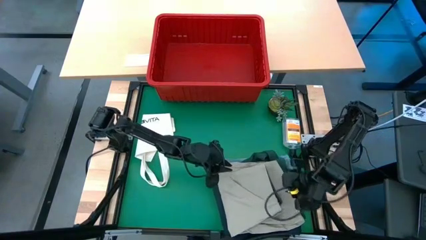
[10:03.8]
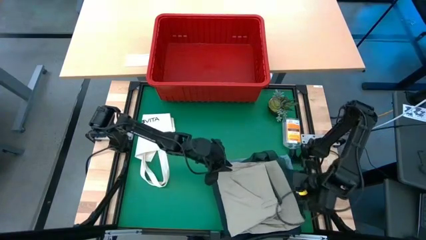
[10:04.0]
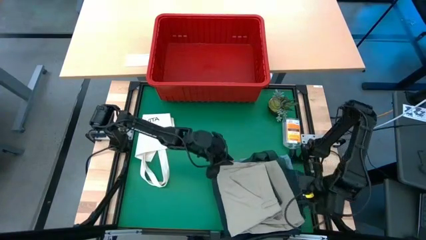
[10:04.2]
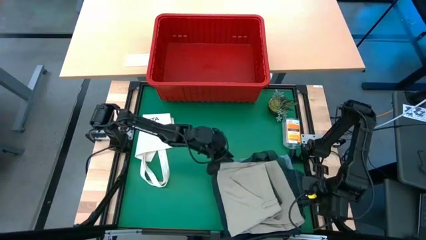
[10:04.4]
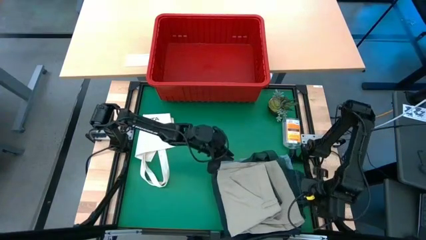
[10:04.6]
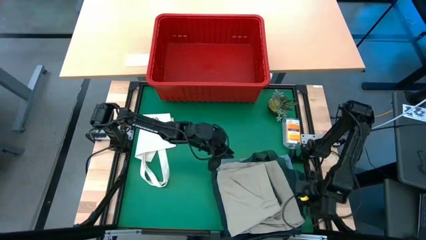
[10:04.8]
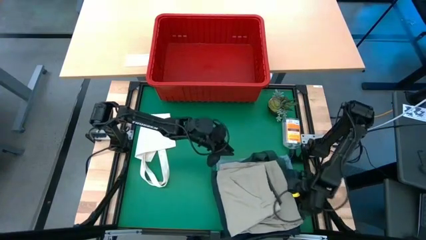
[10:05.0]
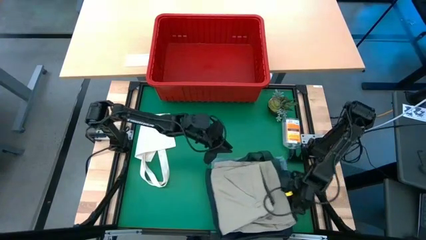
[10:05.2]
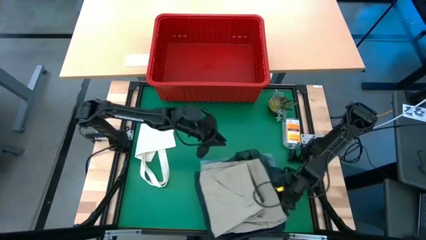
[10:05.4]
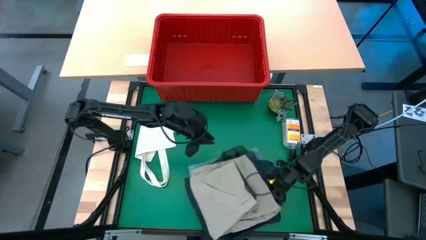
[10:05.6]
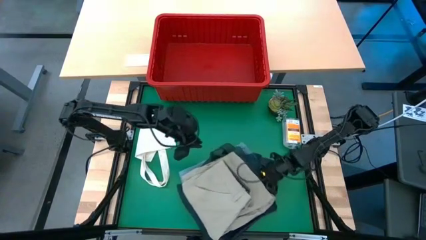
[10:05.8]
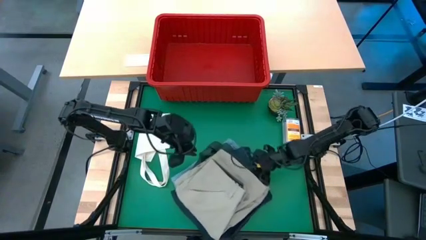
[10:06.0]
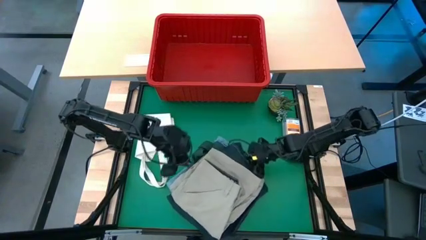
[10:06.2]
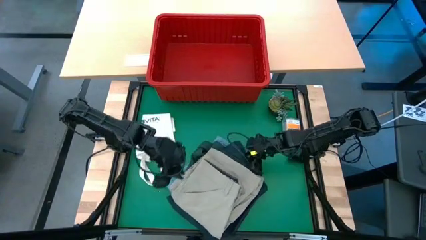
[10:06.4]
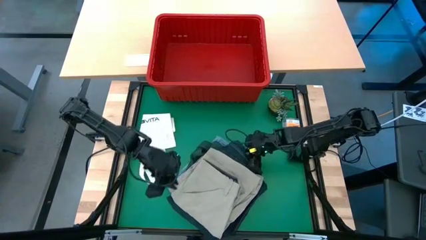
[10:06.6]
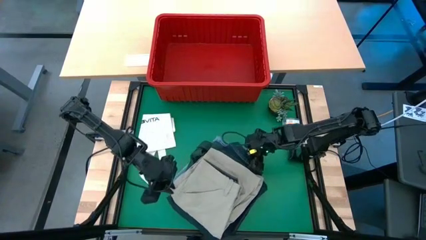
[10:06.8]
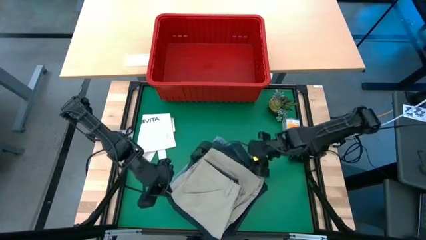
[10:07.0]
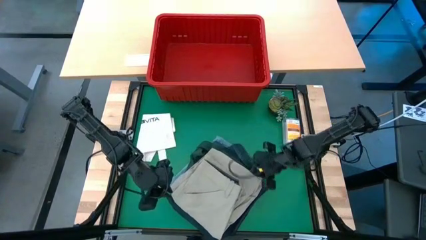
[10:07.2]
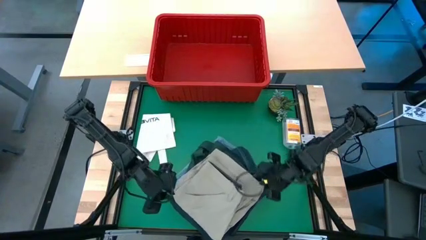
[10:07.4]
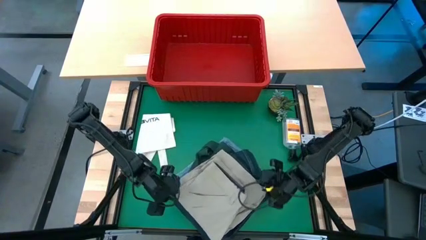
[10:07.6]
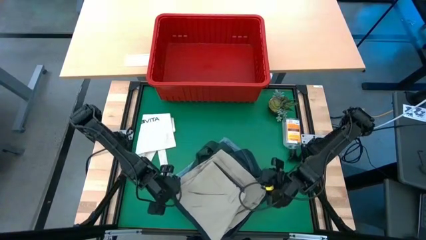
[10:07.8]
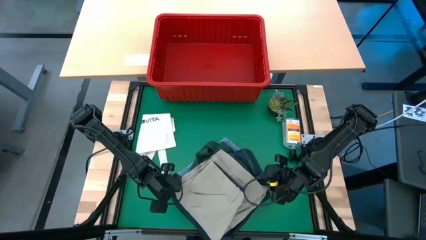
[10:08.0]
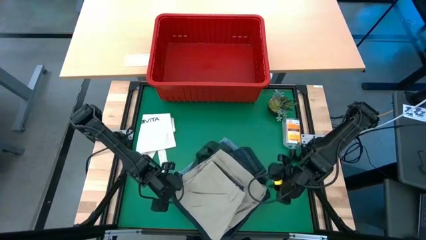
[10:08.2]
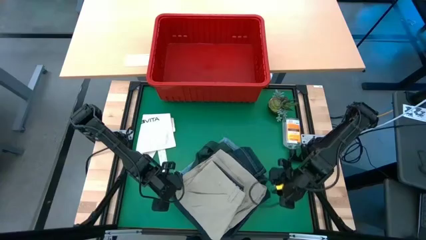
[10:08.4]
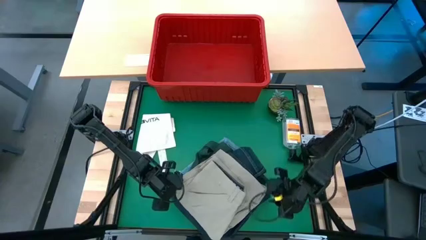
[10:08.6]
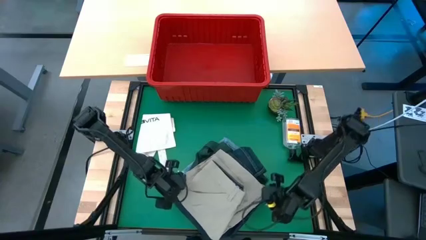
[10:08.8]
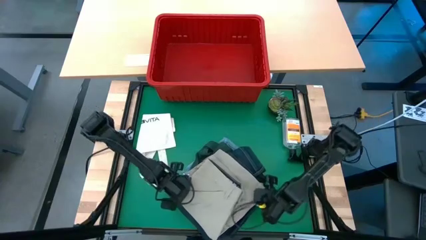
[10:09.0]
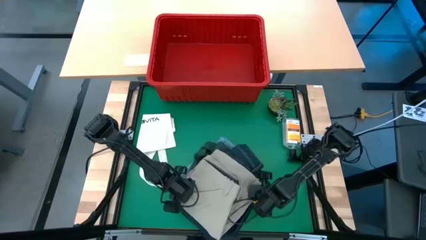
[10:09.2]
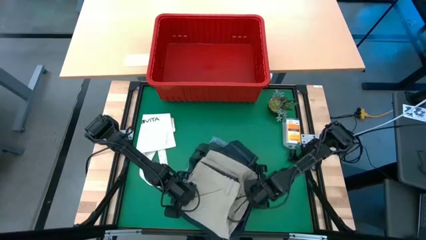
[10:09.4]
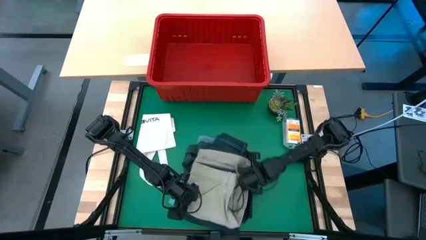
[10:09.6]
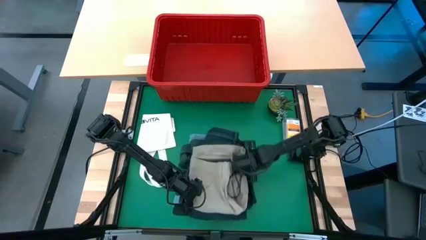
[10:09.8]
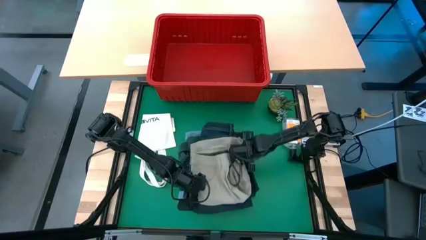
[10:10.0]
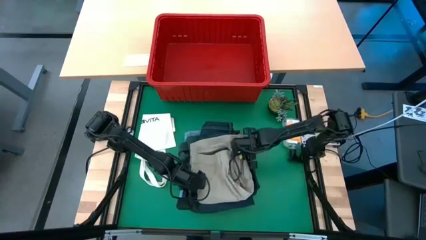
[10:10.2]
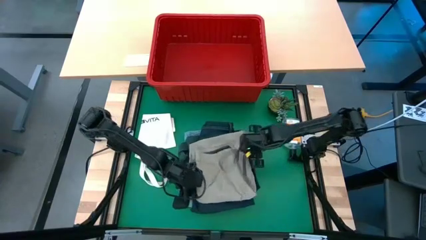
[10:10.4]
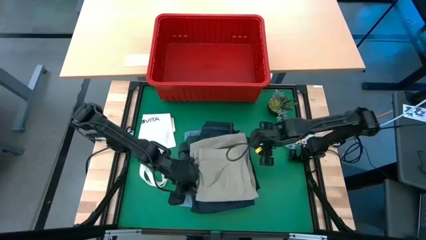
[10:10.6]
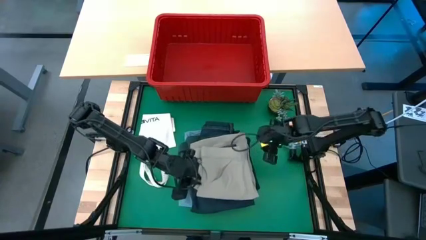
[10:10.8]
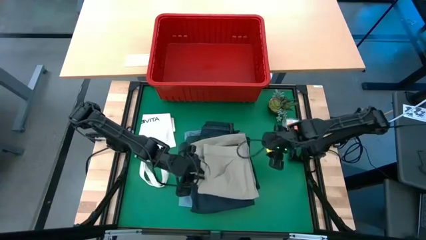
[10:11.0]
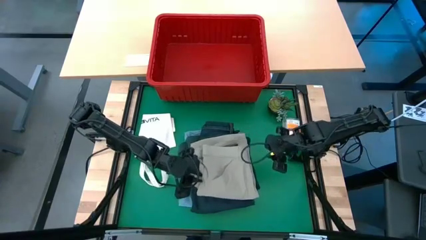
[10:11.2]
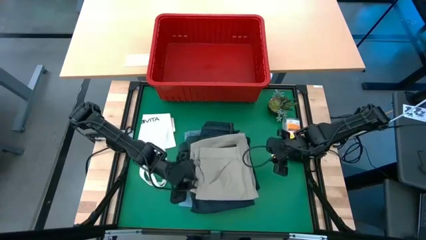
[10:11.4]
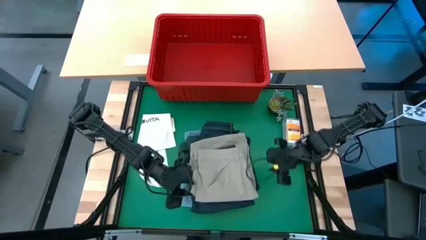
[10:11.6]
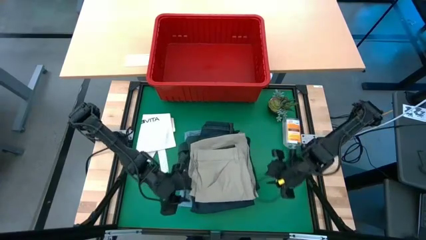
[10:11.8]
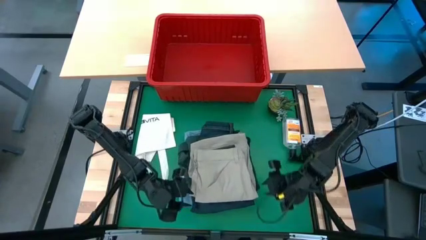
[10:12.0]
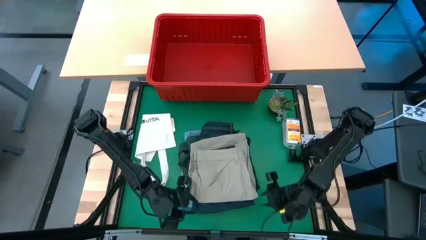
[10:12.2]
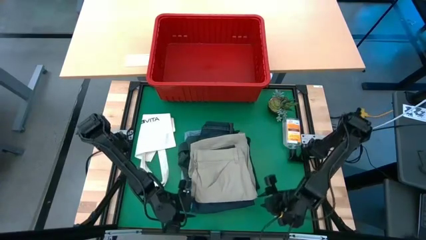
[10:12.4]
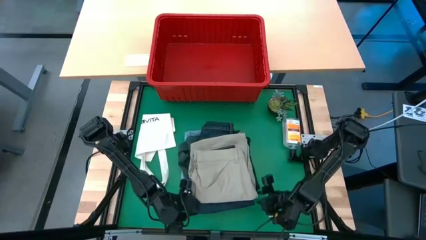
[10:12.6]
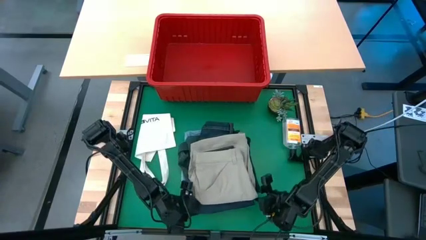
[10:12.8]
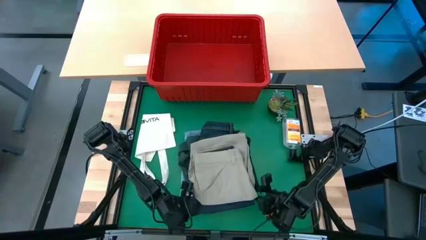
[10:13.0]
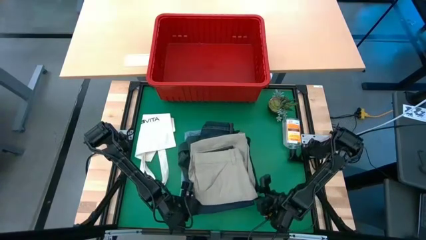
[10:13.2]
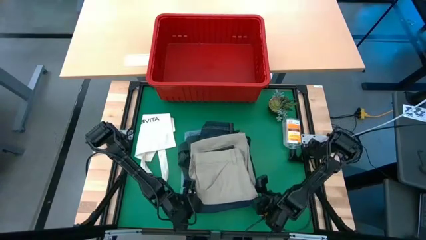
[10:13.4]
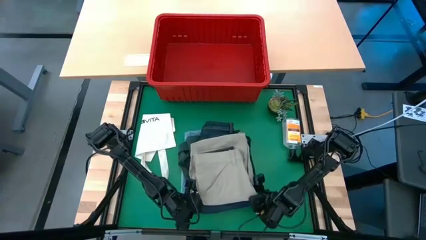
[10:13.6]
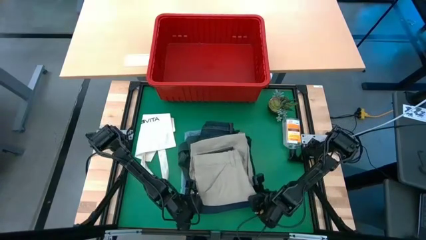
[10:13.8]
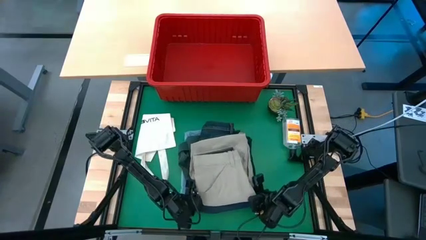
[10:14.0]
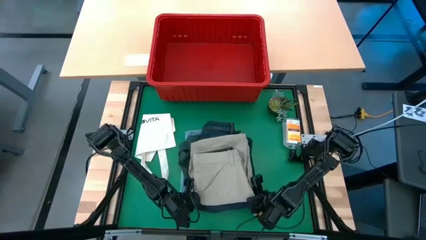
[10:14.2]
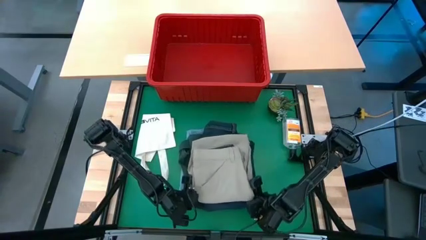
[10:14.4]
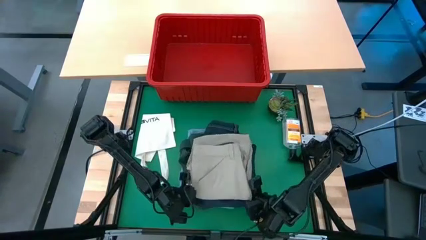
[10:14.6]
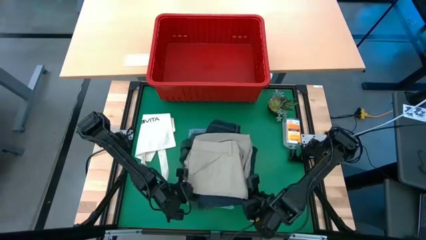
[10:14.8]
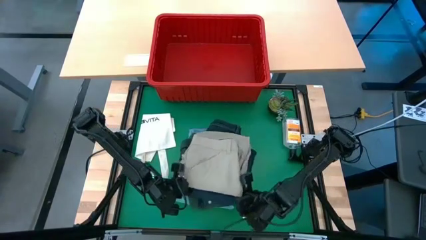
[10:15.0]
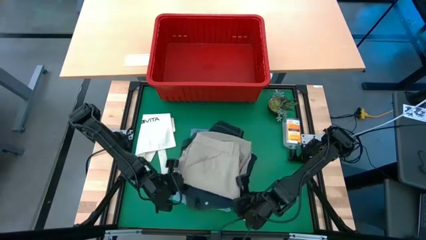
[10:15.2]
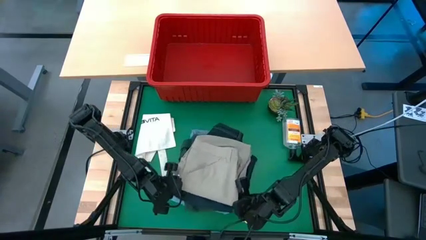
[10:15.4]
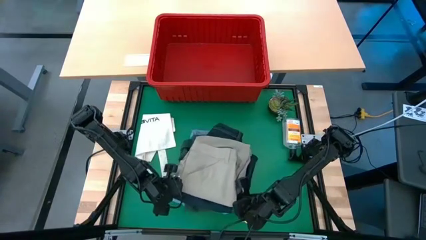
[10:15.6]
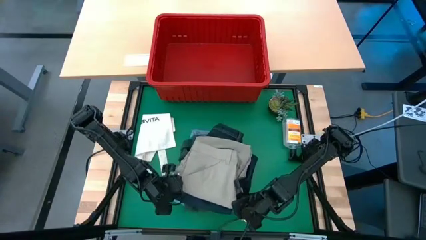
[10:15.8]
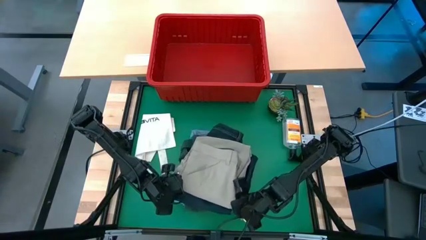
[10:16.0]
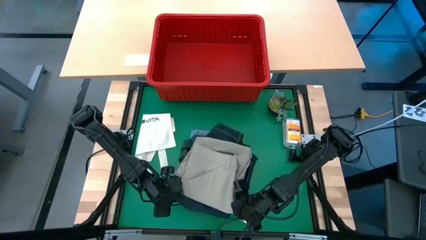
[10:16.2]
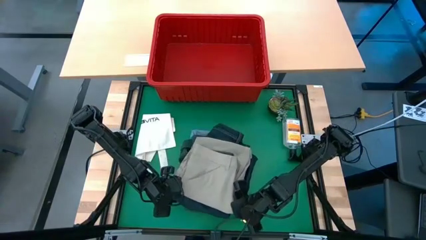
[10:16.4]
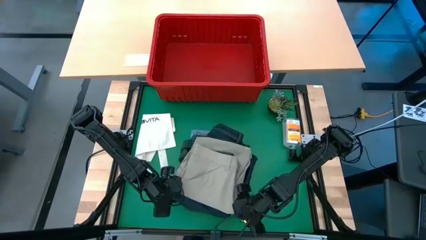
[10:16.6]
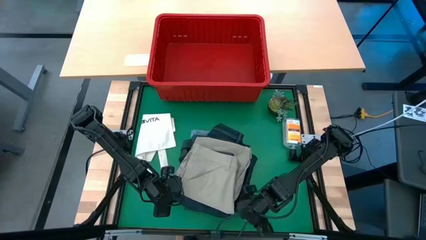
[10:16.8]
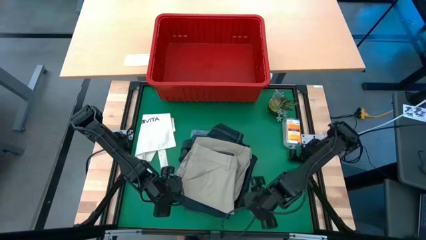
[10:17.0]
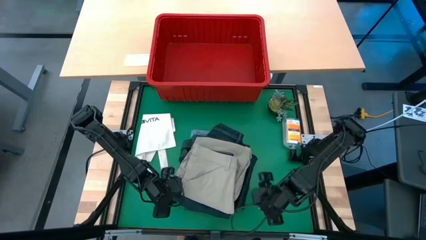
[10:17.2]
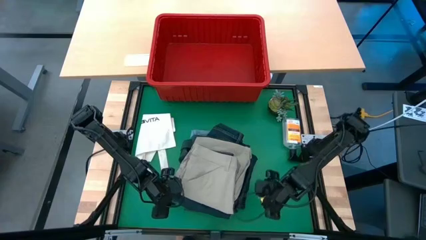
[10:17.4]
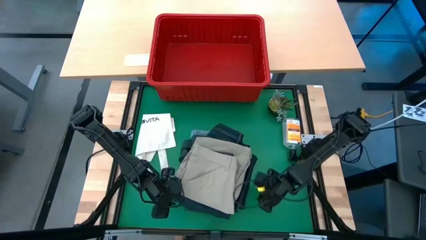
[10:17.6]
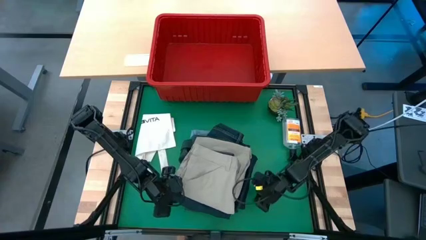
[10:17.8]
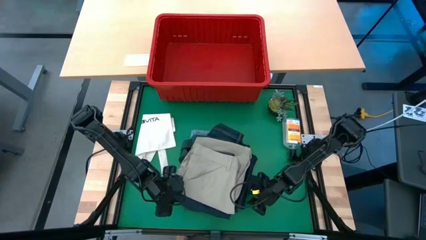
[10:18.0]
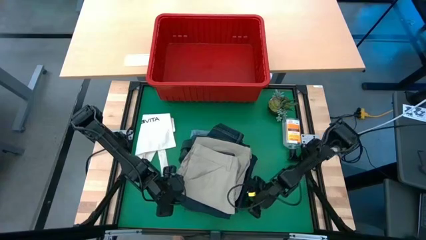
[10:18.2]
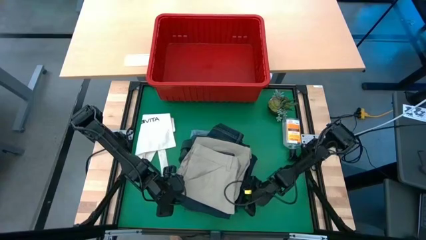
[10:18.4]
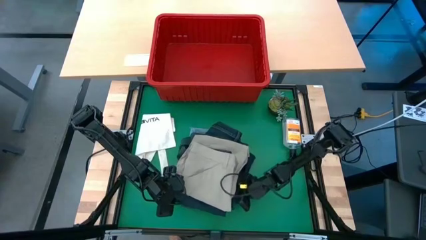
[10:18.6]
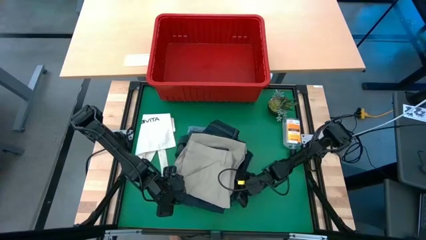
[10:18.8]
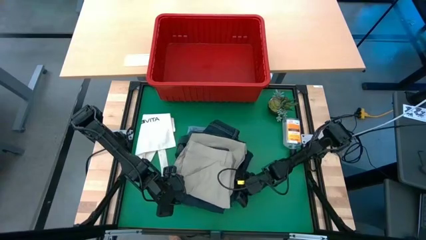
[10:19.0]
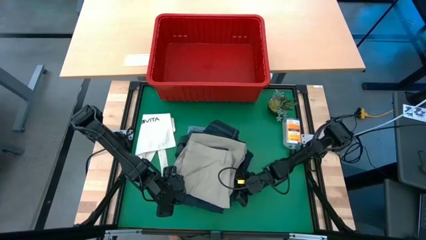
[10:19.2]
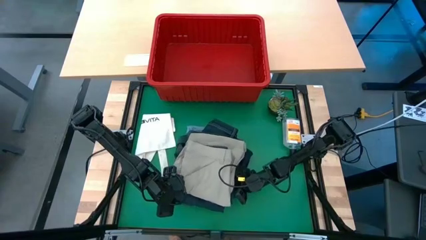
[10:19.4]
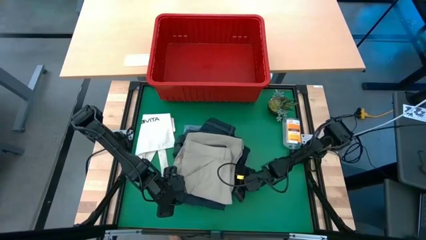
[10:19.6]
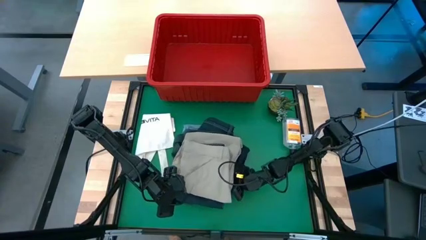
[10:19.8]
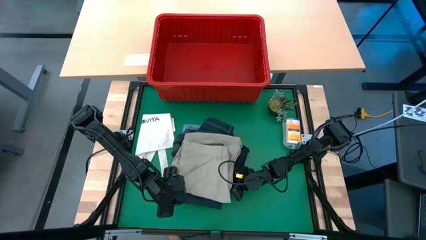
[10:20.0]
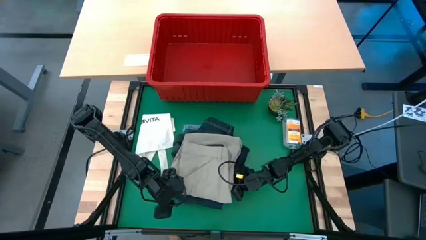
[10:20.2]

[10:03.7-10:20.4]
Task: Fold Laundry from Bin
Move the stacked clothes to the center of the table
